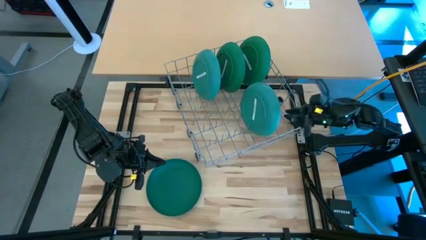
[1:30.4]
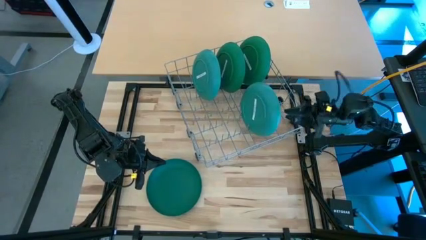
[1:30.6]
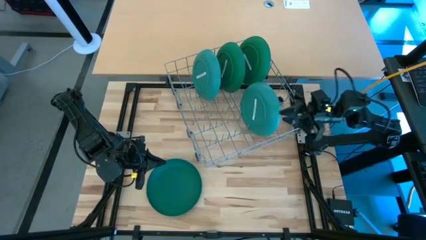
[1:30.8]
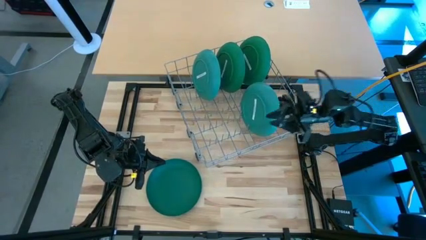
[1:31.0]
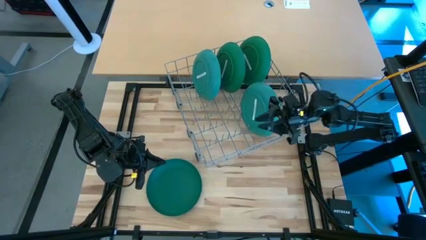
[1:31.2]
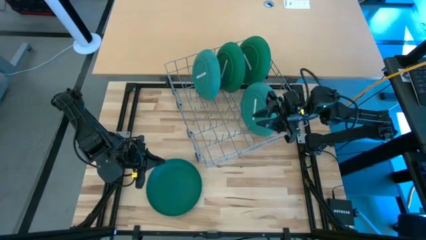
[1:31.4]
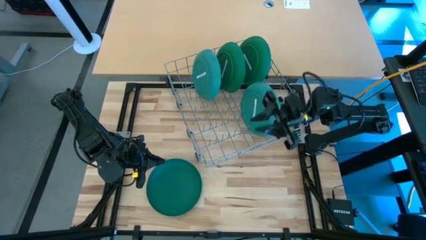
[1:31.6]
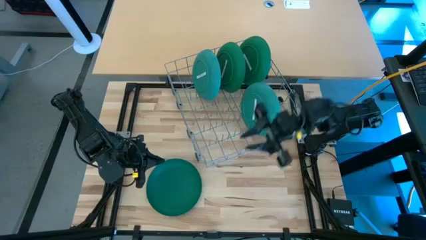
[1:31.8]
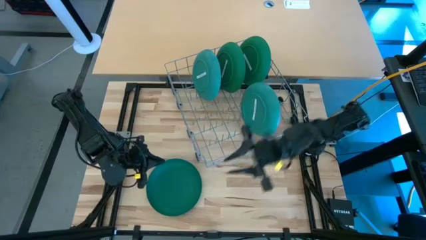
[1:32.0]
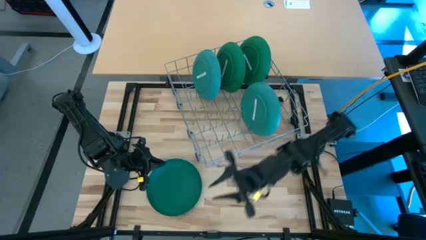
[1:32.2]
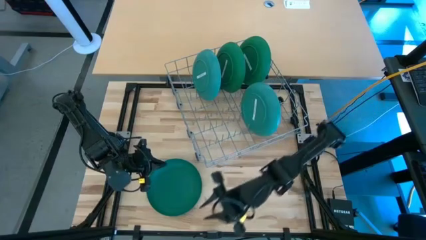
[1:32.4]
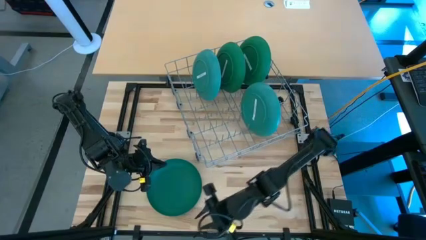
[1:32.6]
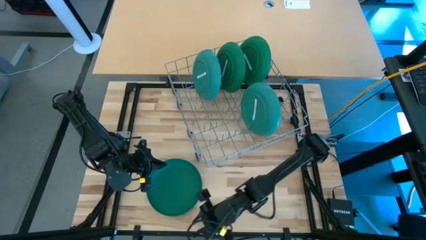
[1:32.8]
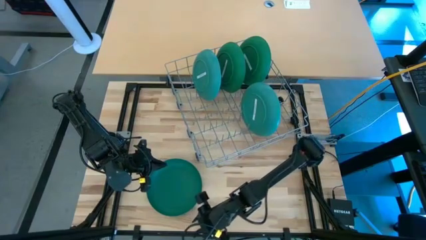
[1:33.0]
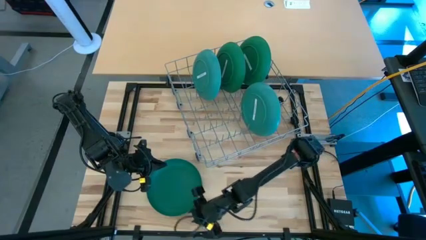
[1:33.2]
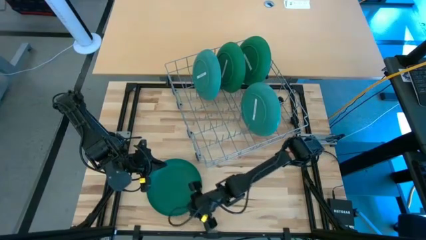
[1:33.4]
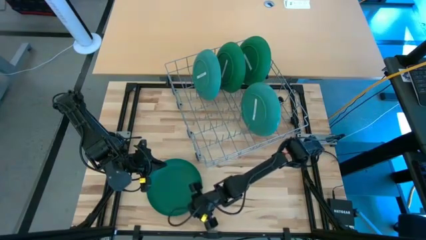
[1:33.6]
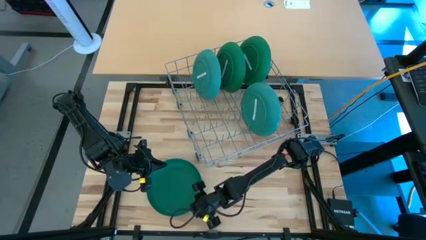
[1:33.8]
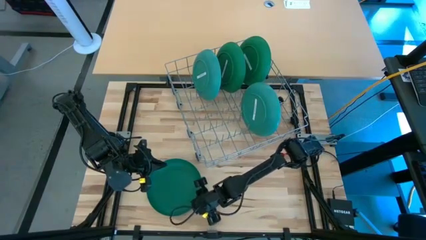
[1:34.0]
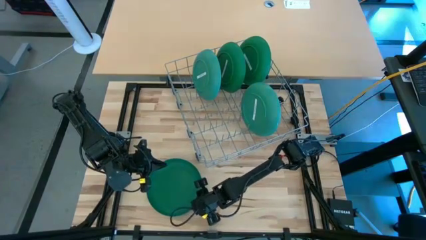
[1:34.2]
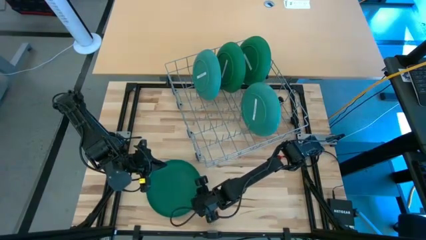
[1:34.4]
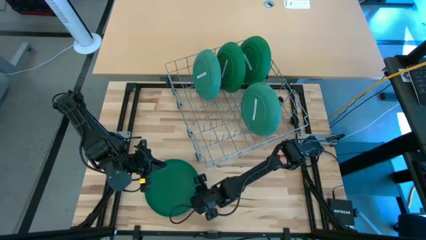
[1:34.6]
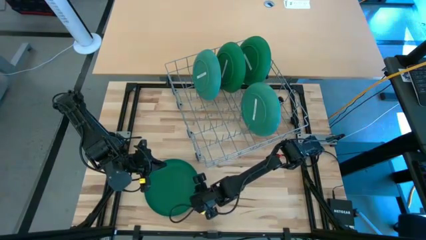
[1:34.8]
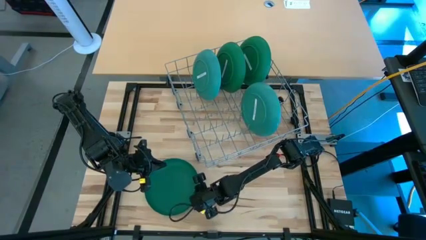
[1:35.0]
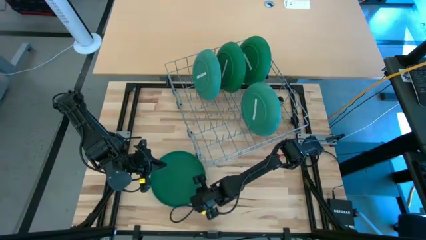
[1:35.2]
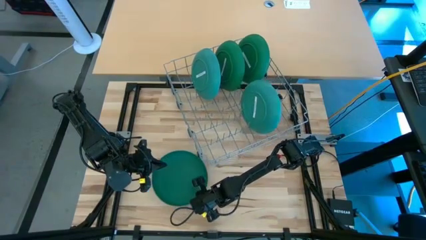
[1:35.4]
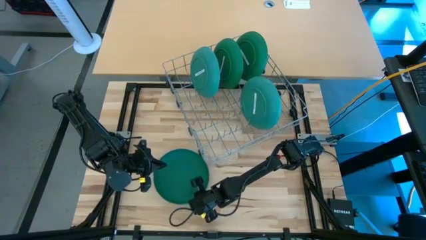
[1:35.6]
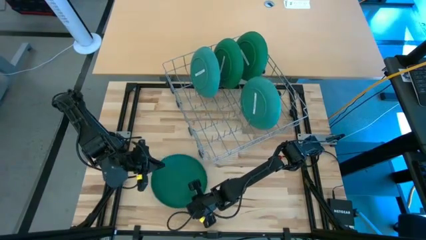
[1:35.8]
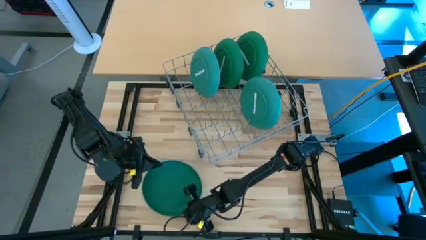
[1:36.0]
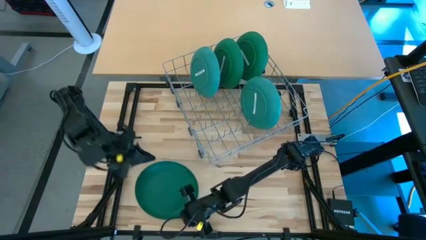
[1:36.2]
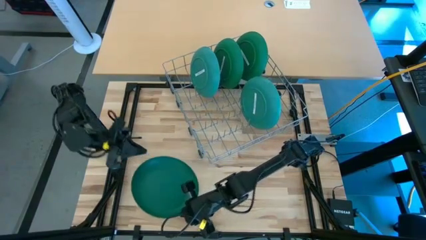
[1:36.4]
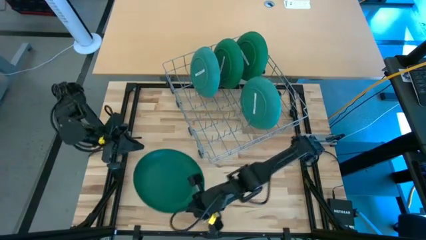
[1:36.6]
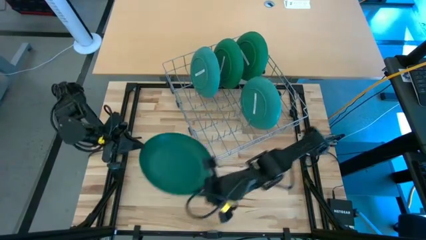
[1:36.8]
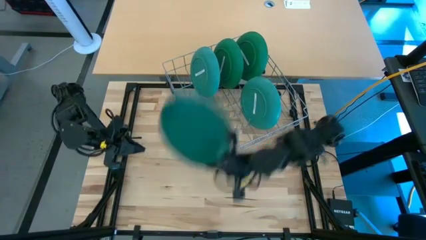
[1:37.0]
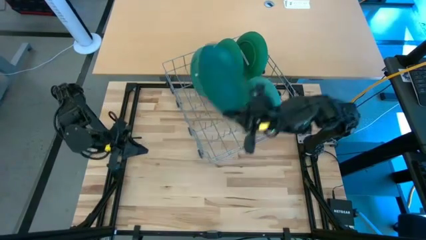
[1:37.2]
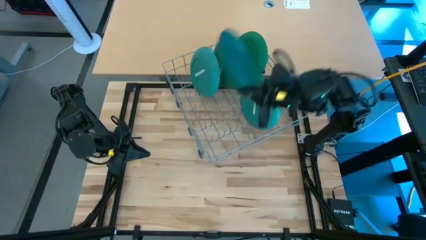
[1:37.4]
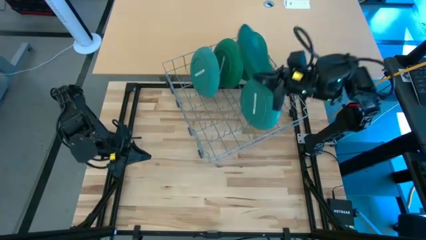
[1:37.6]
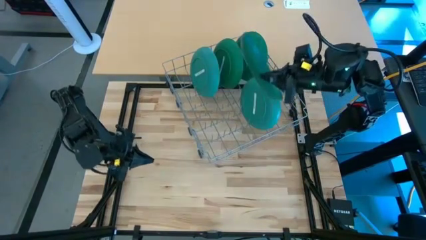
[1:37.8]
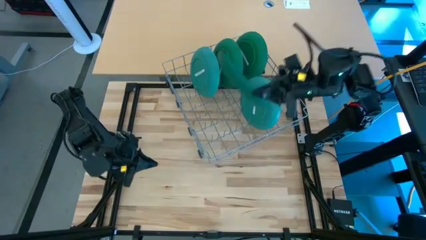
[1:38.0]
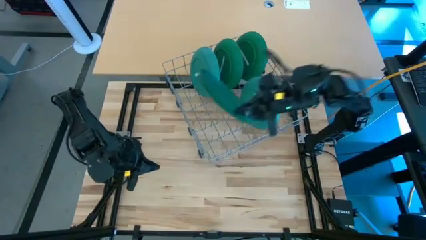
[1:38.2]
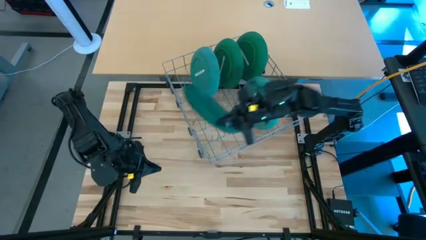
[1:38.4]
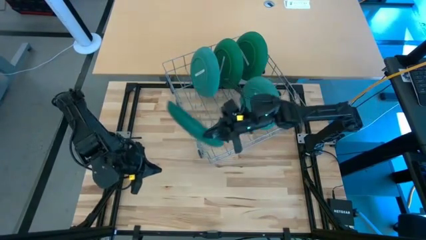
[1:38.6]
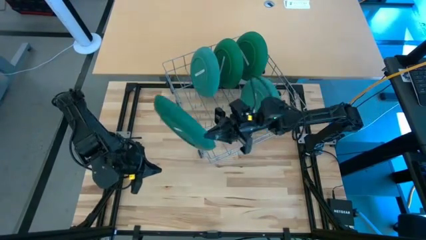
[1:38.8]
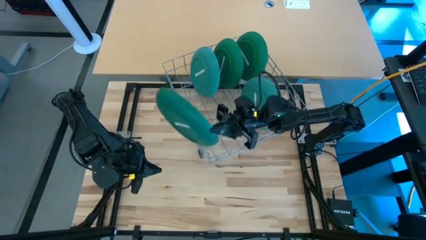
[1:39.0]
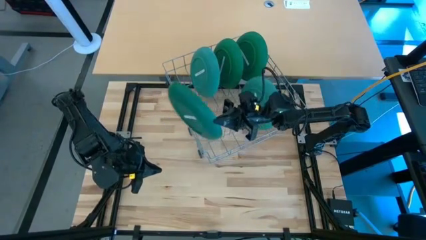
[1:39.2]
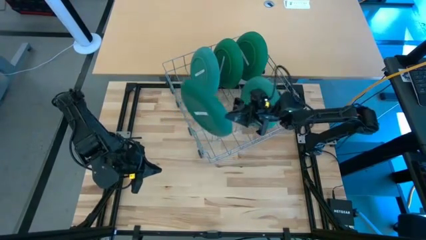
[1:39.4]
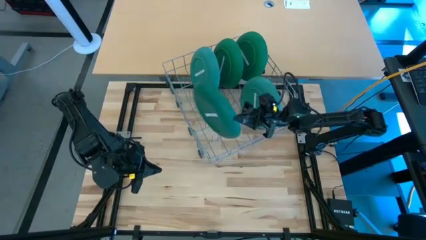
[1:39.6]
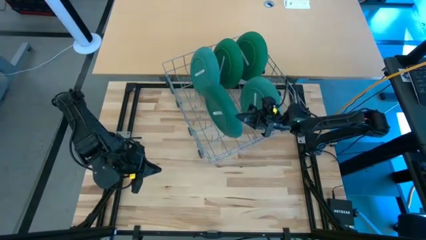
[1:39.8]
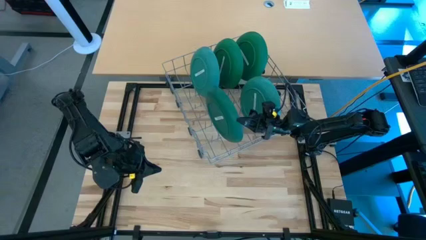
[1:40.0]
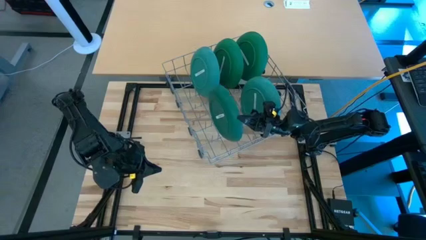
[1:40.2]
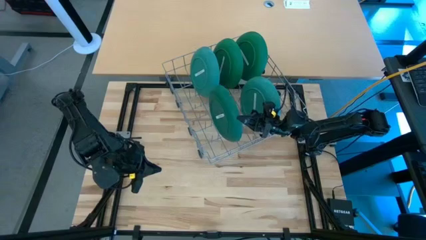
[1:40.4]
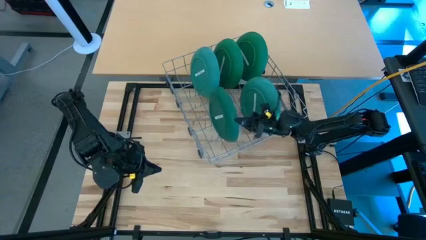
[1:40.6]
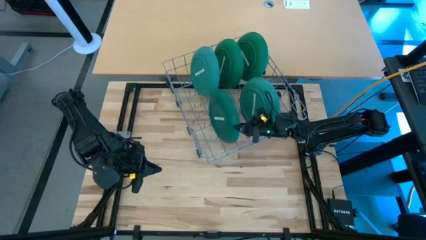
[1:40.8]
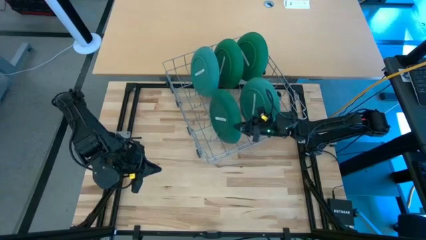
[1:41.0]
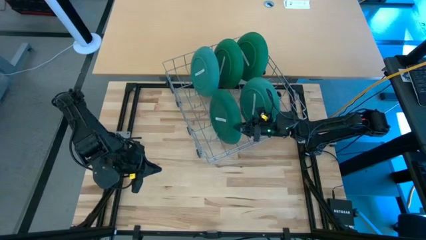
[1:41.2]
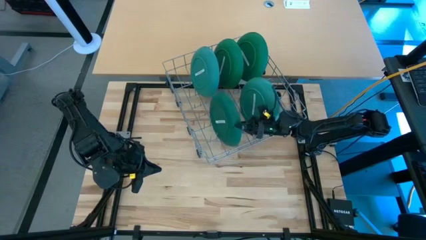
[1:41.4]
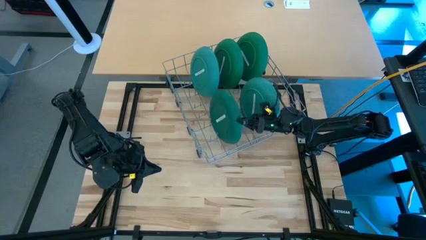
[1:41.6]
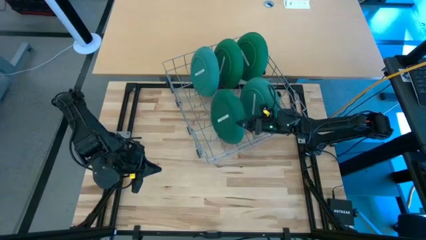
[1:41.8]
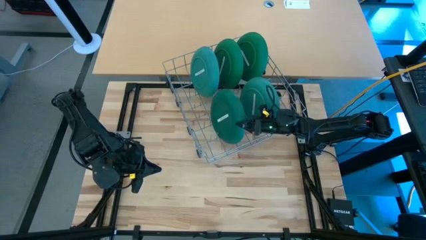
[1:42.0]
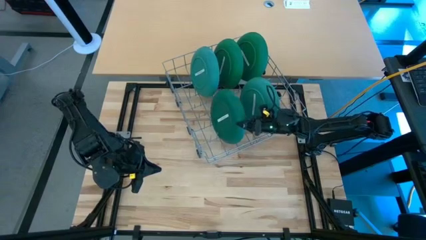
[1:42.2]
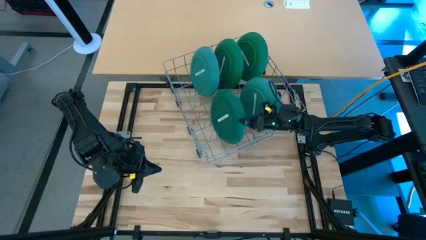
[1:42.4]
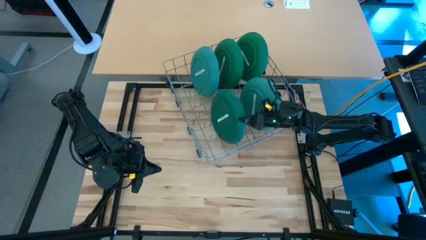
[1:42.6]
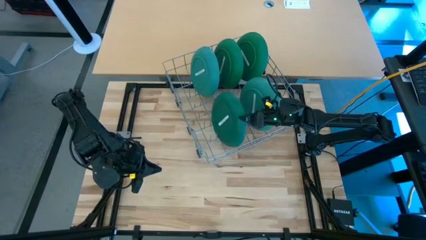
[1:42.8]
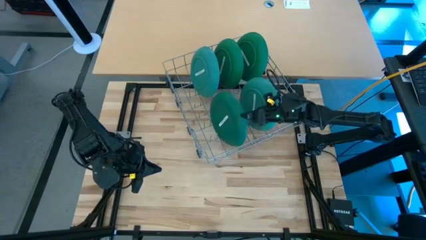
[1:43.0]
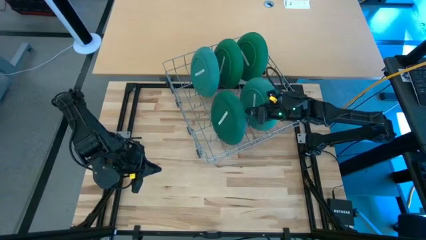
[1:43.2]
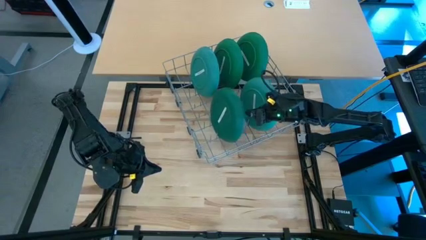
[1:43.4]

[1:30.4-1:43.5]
Task: Sort dishes
Put the green plate in the dish rack

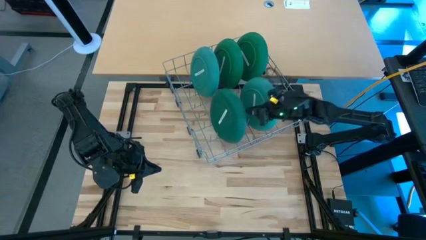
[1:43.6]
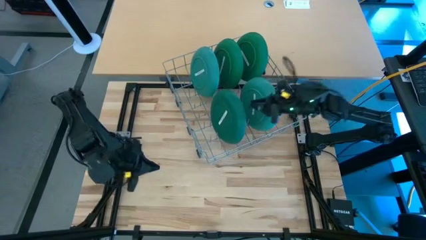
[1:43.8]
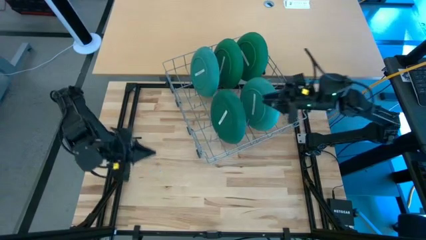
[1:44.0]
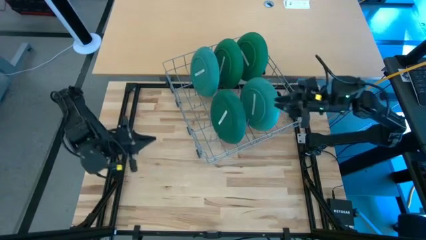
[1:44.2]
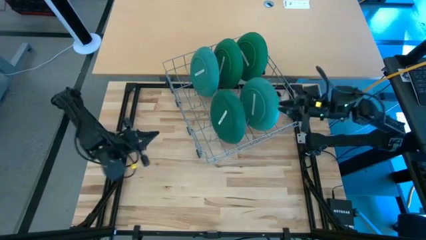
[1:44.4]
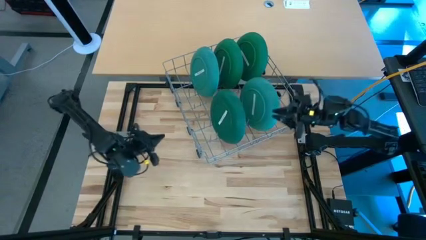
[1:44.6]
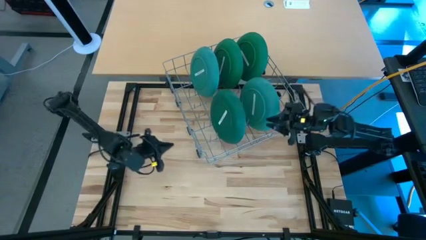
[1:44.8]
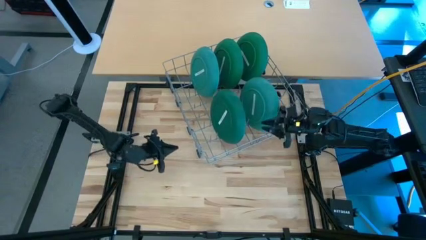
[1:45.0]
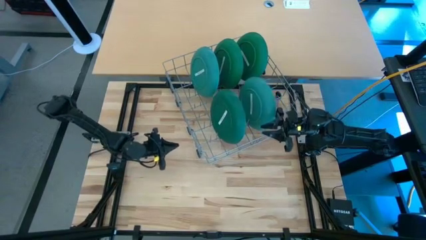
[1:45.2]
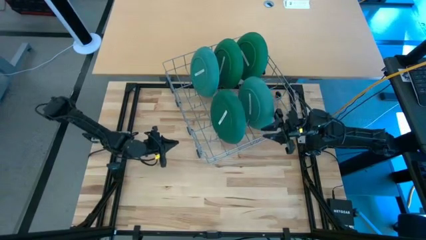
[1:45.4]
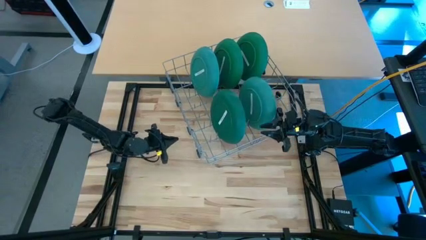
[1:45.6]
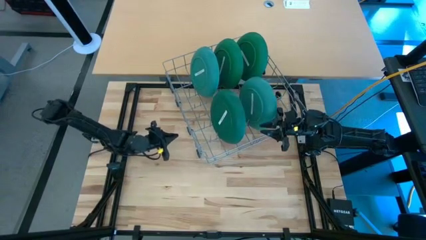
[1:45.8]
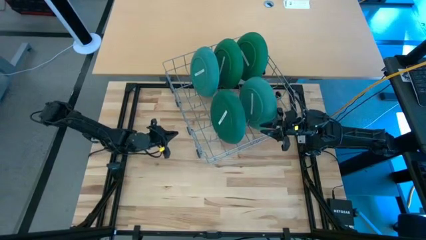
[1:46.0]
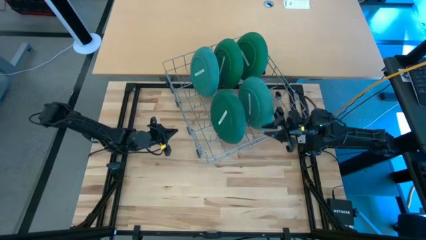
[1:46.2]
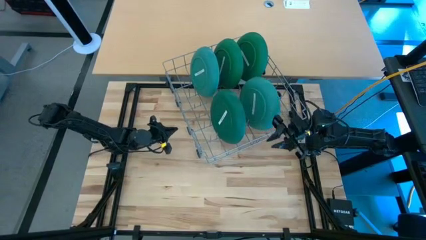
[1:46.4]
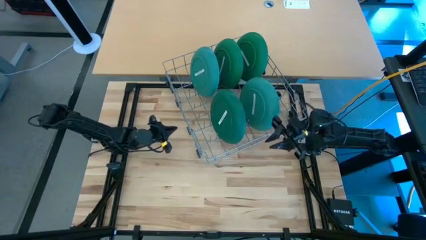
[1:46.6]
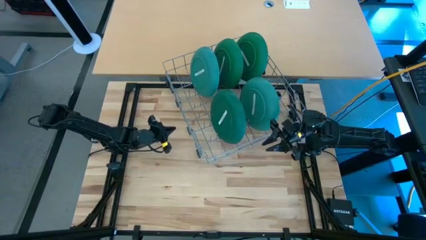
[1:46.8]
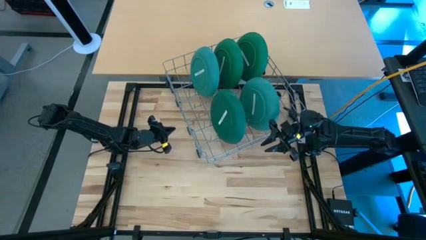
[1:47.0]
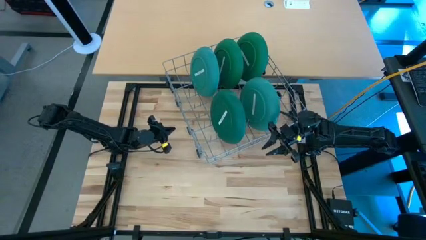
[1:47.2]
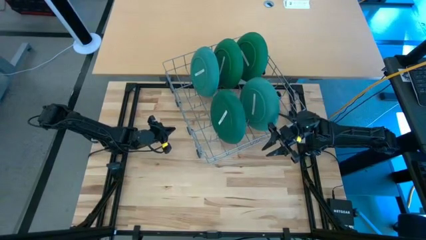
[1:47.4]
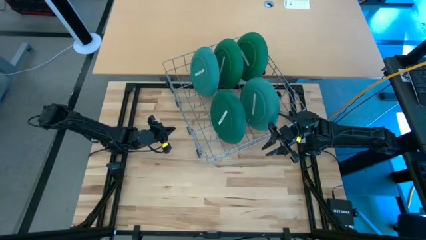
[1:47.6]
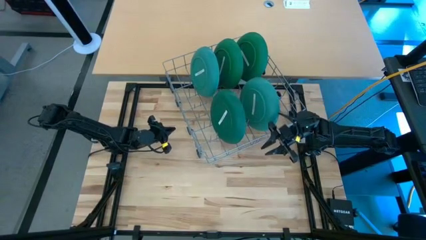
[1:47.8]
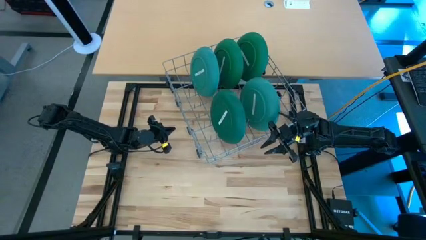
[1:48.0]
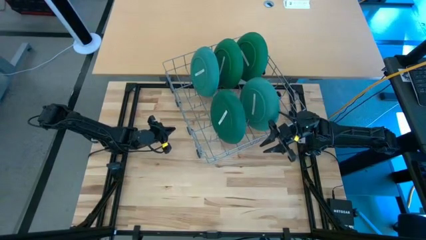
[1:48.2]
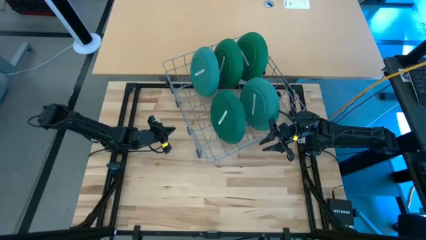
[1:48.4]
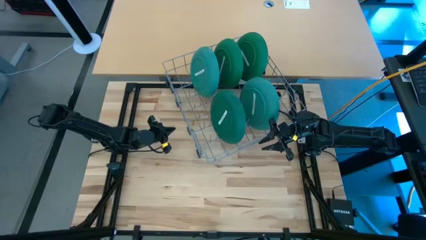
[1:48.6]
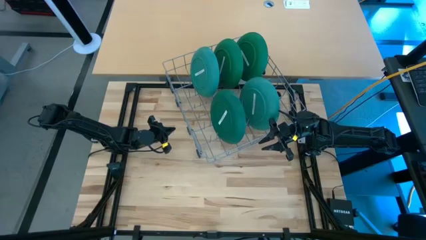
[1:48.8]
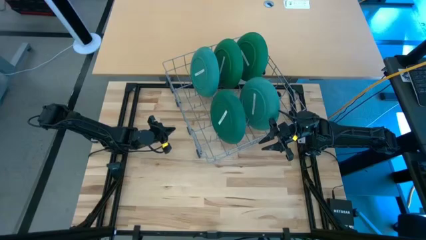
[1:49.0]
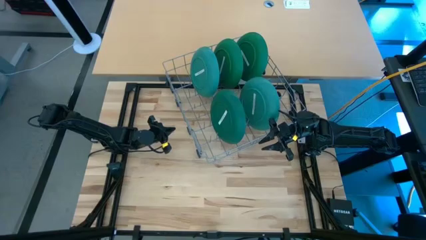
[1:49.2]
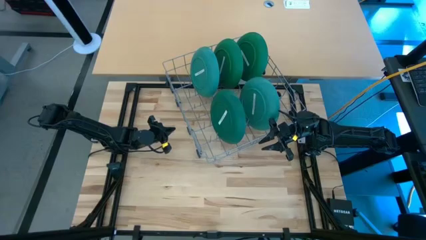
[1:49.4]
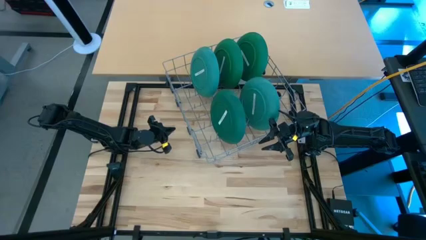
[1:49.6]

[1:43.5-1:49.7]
Return to Home Position
